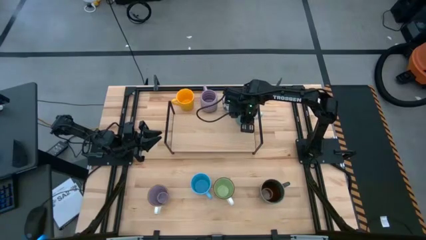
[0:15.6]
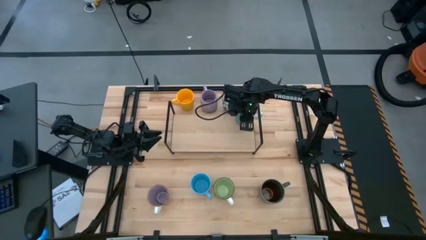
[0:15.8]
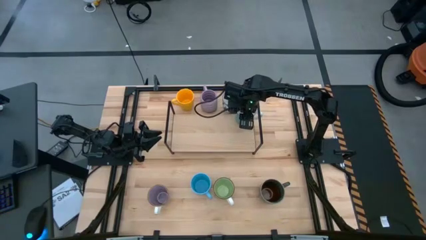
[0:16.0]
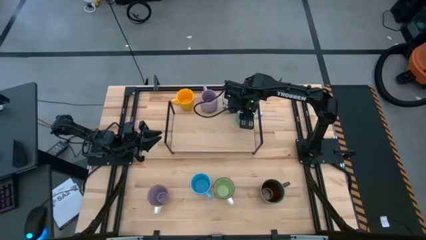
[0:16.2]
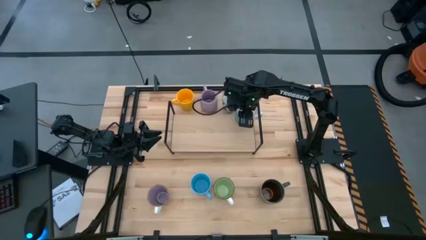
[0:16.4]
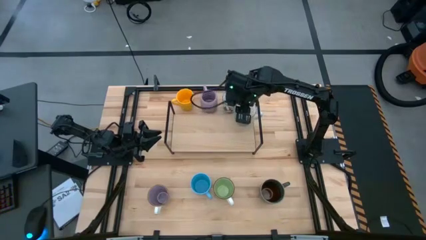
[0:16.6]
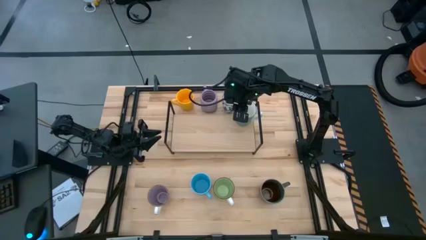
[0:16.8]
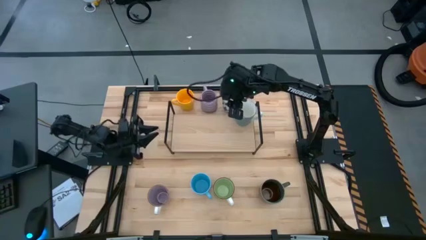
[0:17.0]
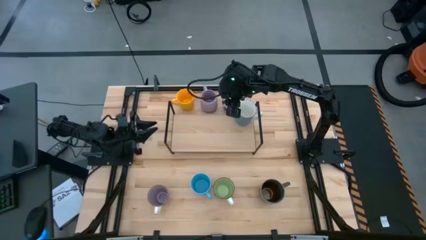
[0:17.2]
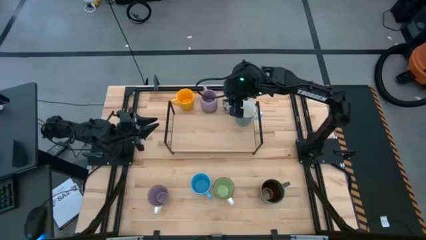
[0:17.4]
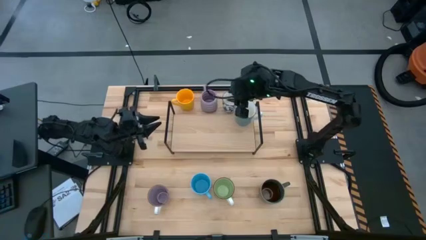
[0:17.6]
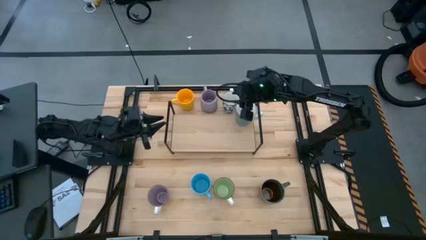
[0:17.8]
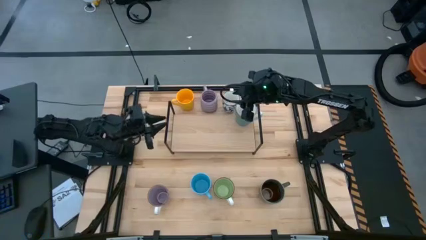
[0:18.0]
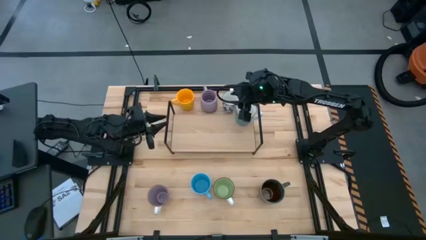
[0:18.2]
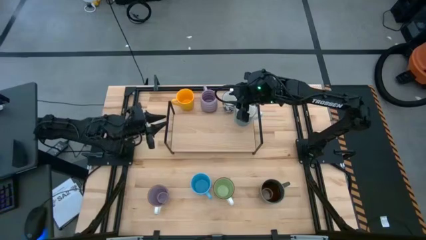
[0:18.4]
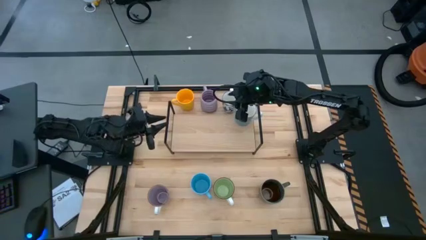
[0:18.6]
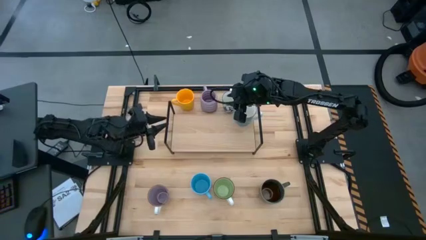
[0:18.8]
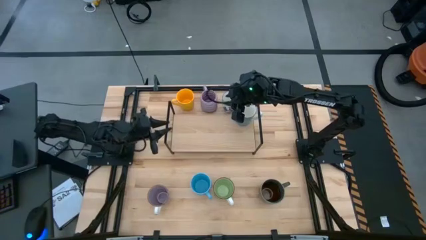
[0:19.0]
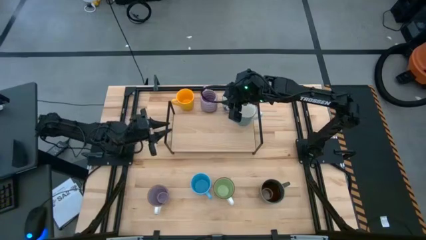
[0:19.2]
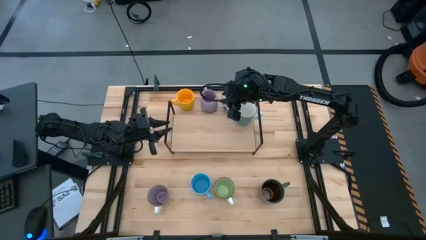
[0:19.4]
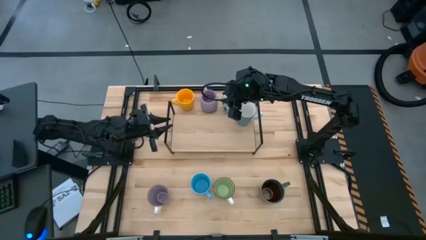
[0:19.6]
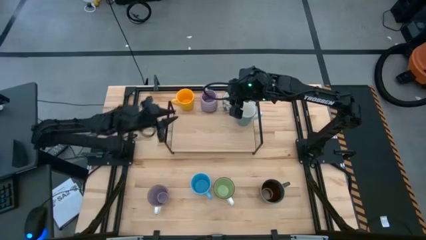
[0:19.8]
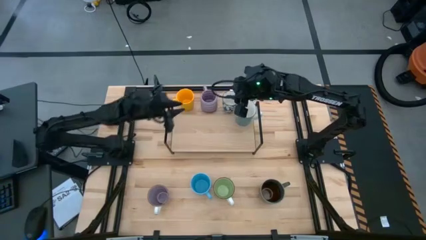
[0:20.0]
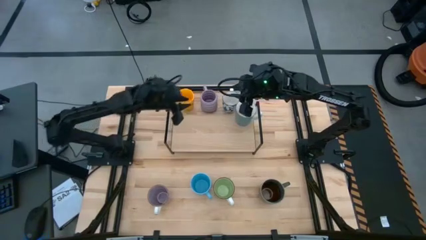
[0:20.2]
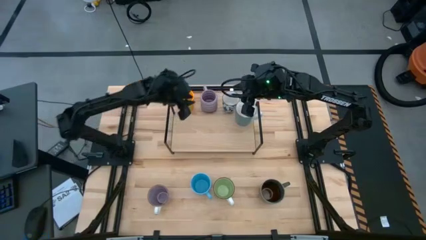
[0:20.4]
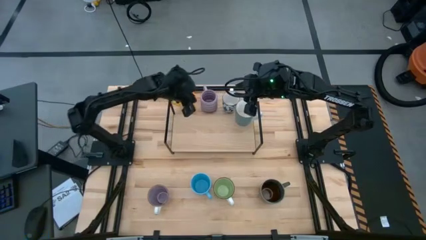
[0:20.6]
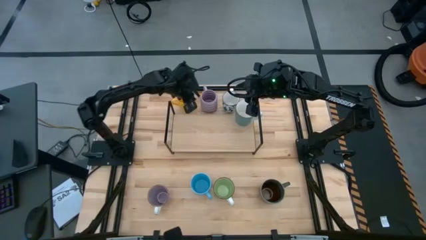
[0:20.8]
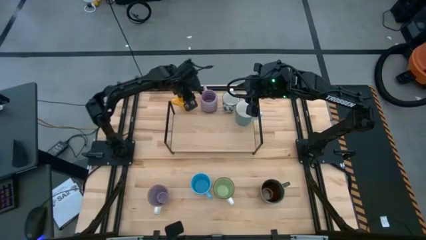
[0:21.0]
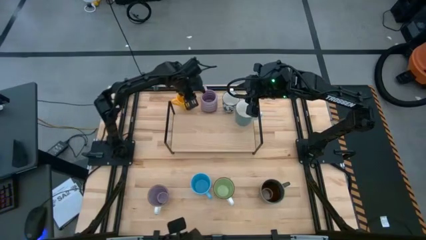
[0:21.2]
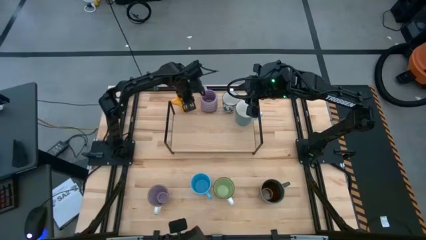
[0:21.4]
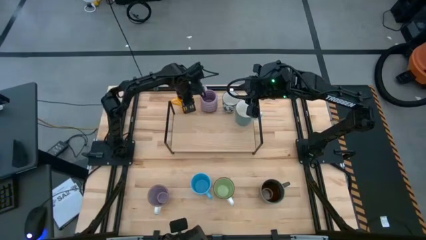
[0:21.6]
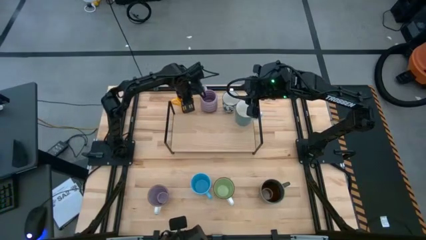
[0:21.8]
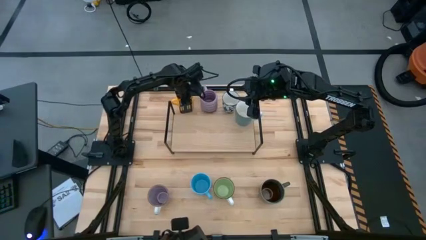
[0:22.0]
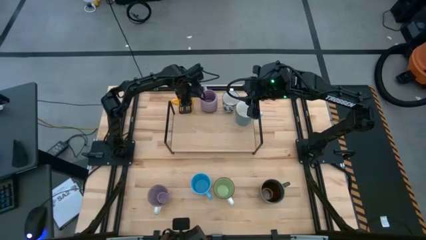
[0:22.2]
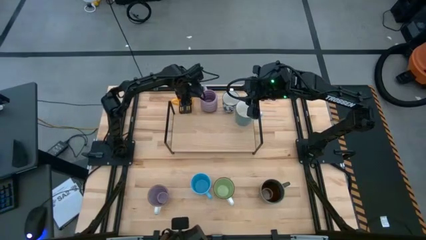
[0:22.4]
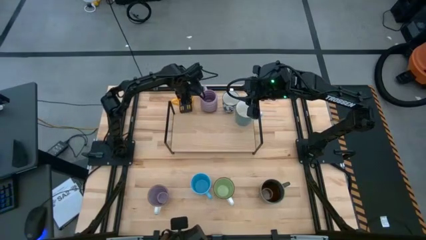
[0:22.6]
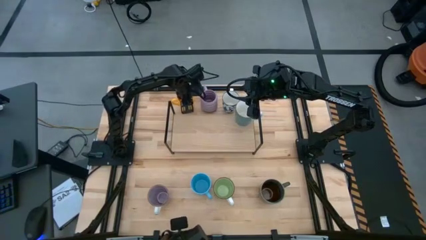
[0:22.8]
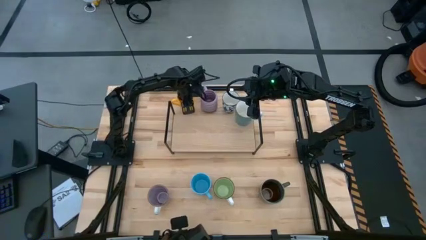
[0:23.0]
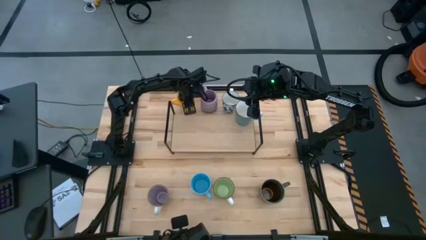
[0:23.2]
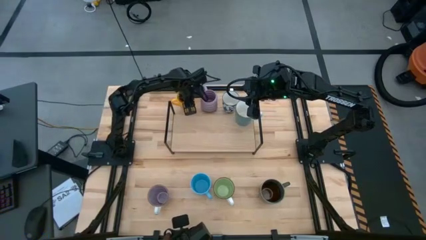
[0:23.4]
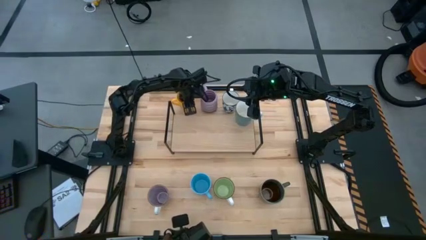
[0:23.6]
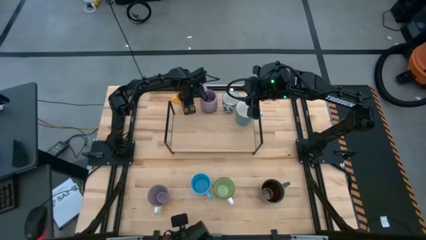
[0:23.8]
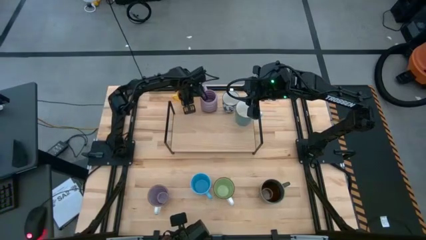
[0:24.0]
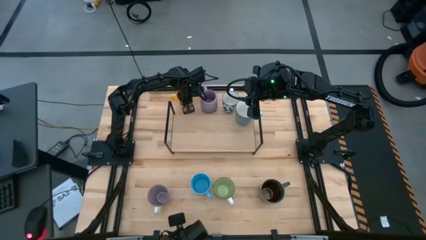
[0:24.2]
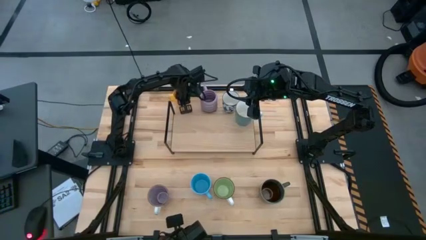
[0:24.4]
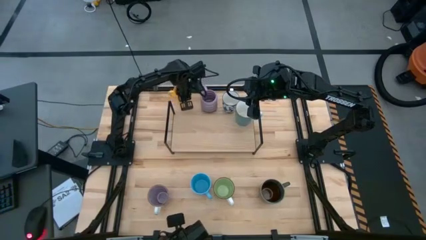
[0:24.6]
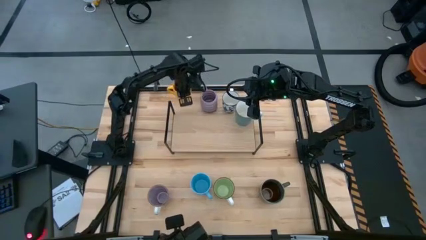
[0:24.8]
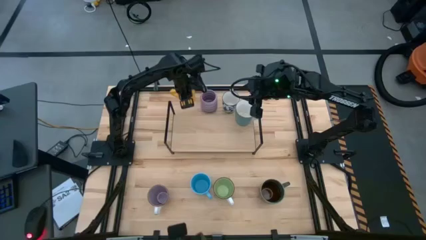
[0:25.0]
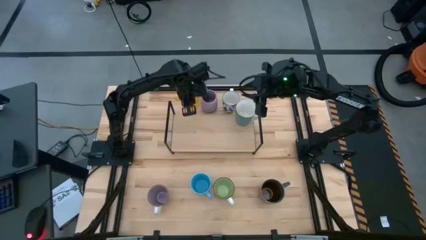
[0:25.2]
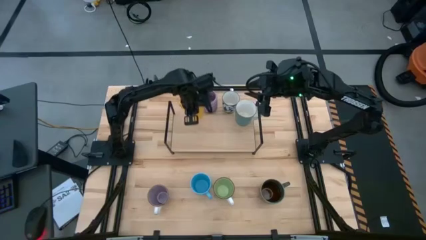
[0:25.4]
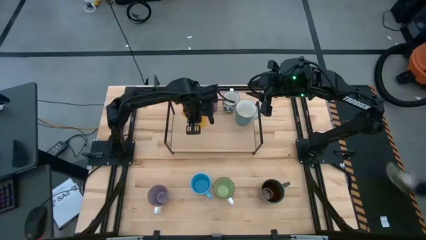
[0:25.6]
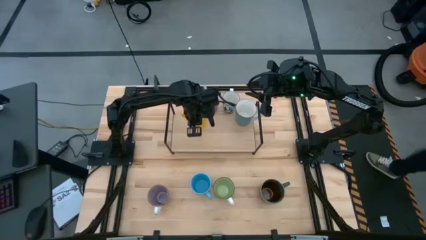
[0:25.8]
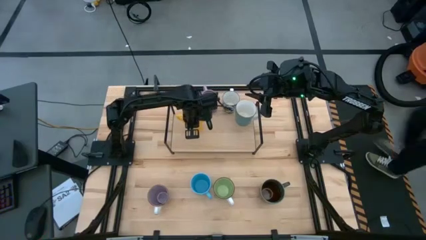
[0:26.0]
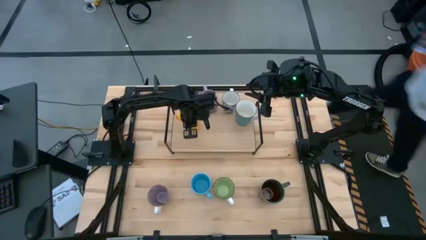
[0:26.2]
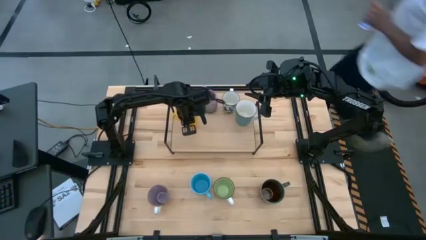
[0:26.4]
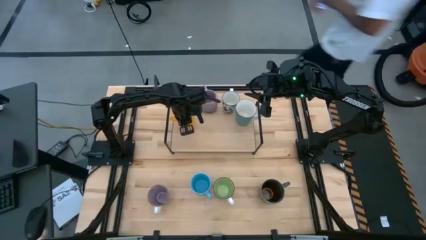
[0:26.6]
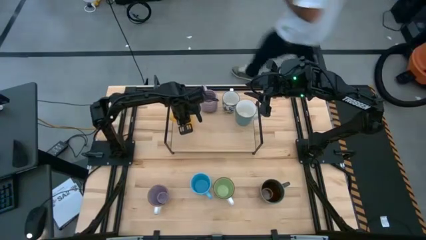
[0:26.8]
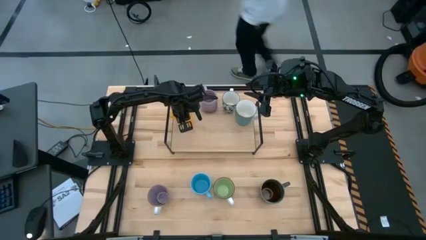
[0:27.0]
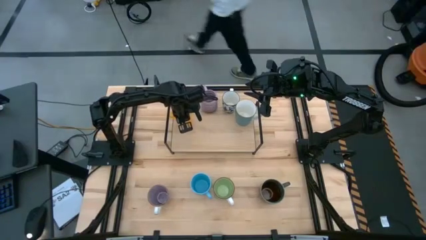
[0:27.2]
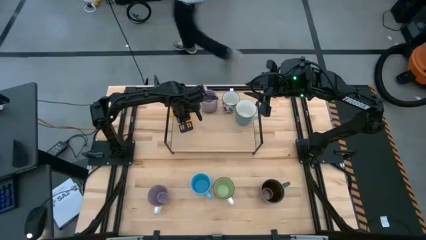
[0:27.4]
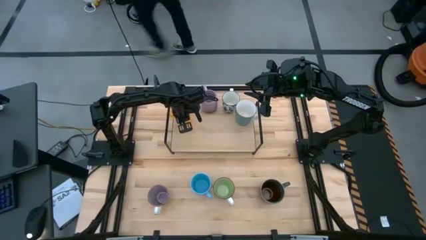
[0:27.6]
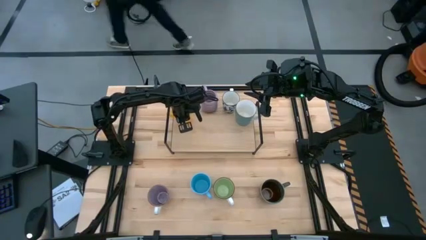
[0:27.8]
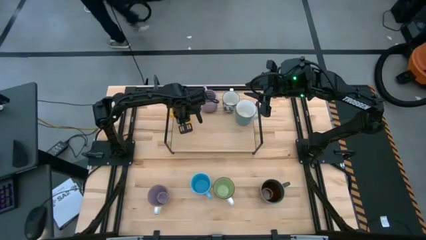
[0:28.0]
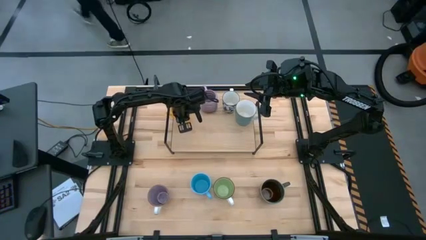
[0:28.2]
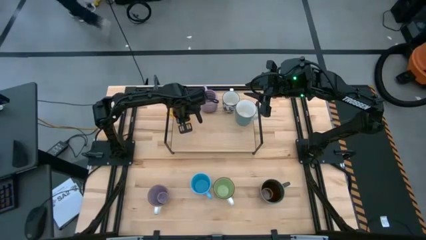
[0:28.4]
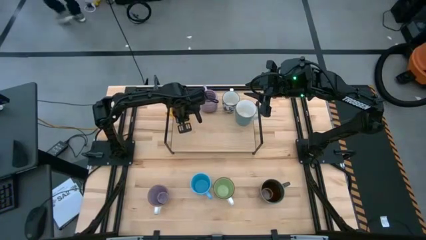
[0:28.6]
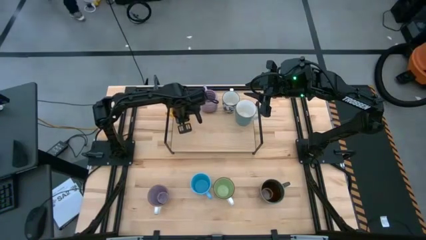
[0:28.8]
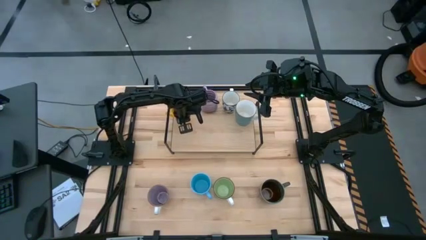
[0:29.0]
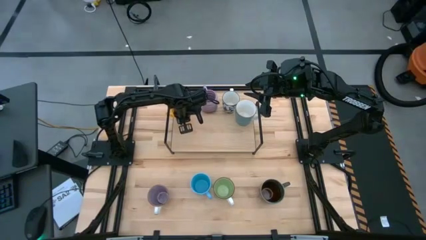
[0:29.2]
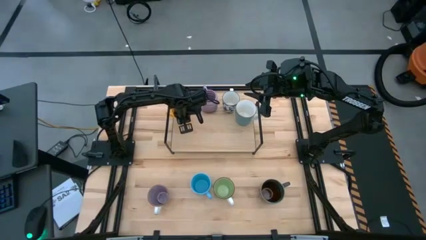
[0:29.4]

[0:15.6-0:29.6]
Task: Place coffee mugs
Put the yellow mug on the shelf
